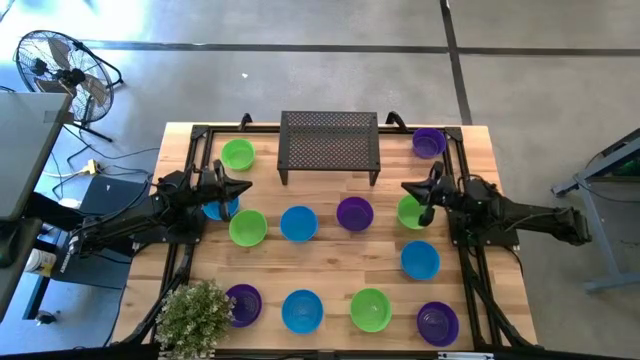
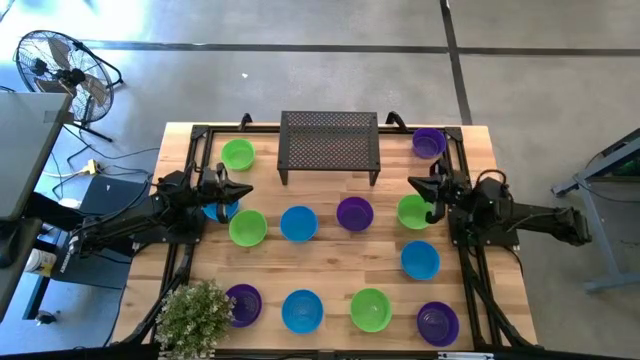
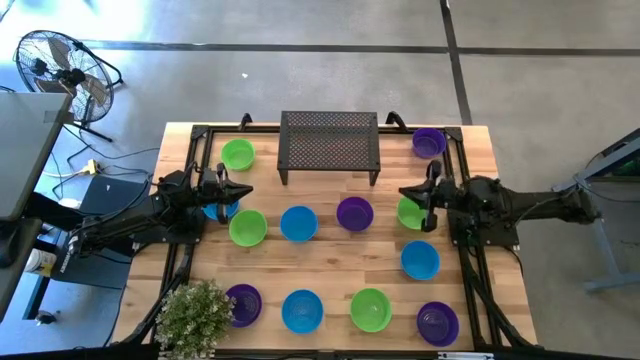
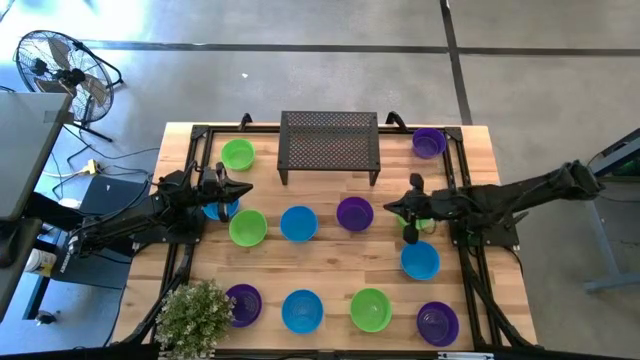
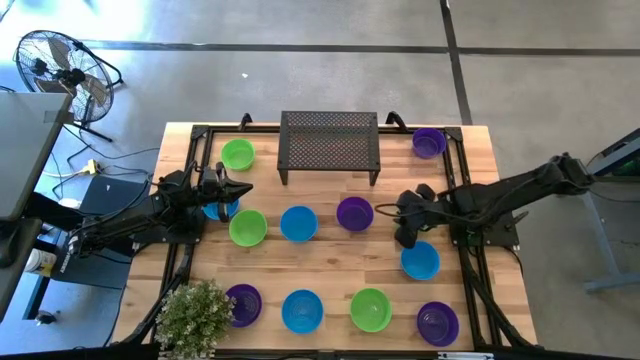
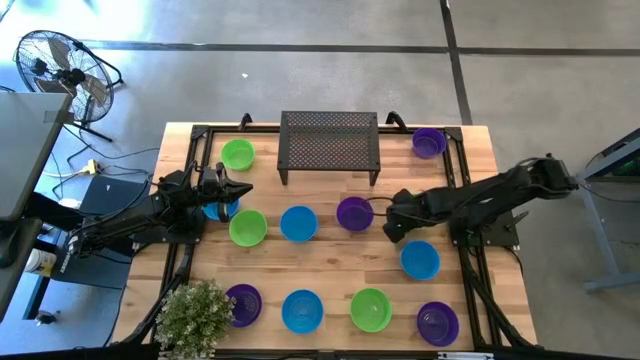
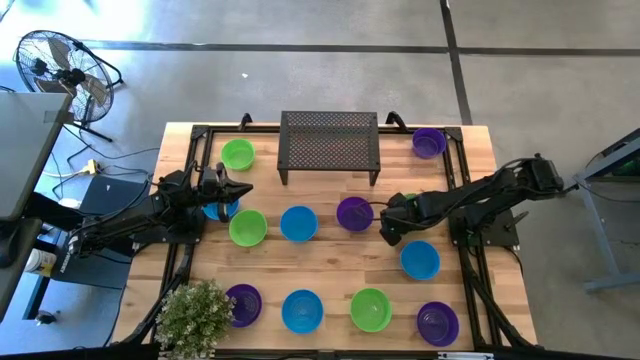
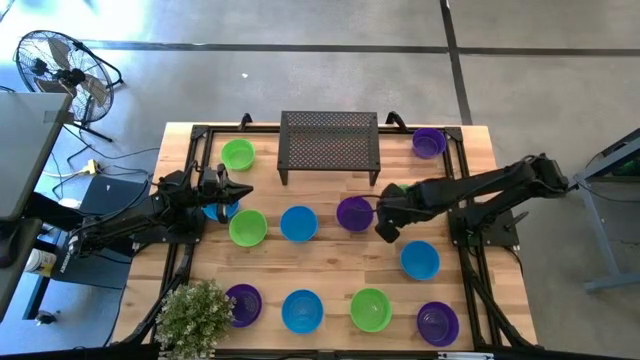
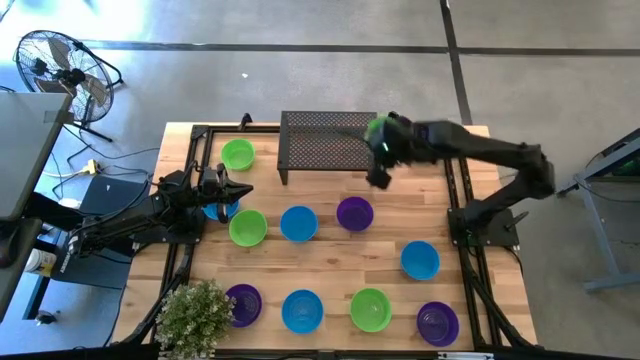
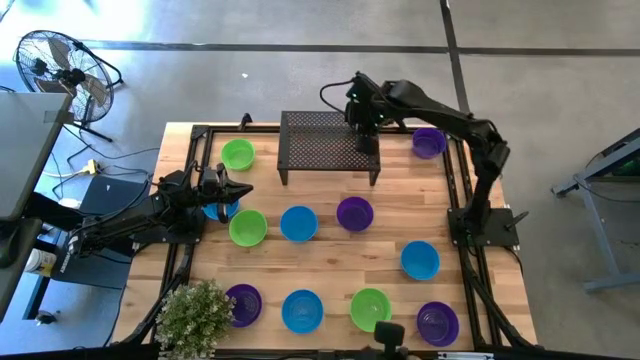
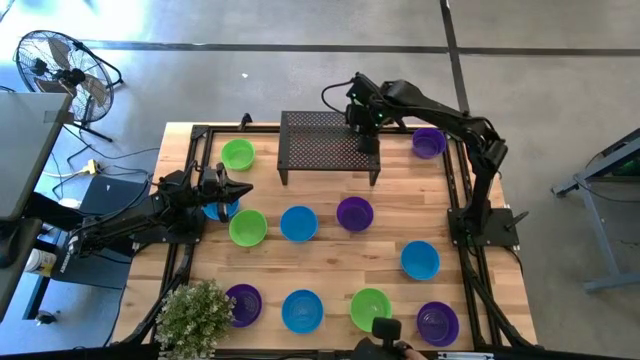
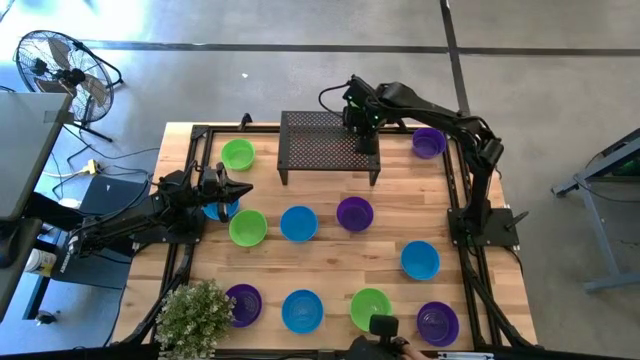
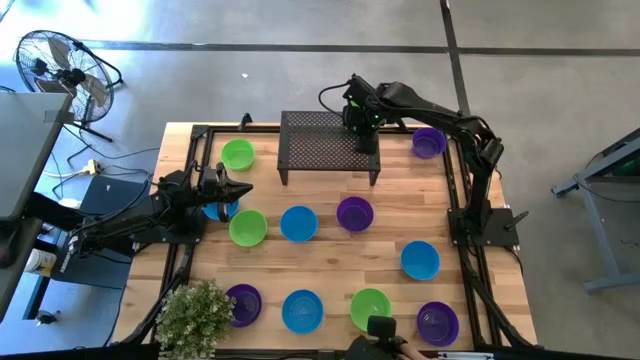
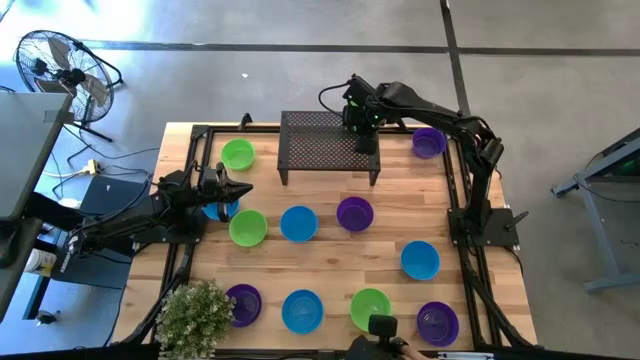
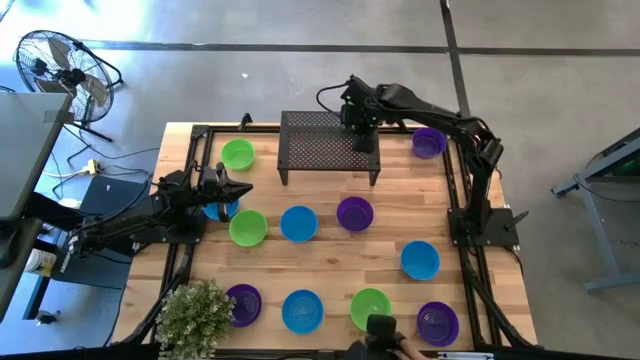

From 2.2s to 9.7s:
Task: Pick & Place Mini bowls
Put the middle right green bowl on the shelf

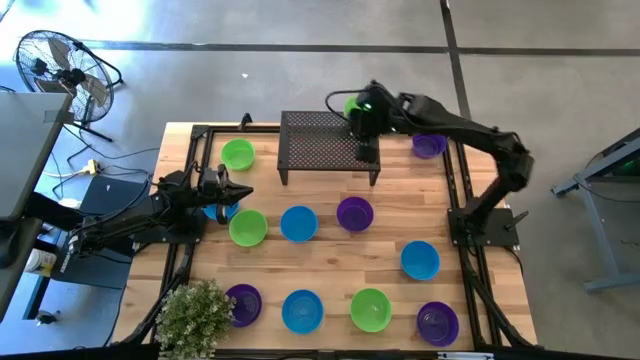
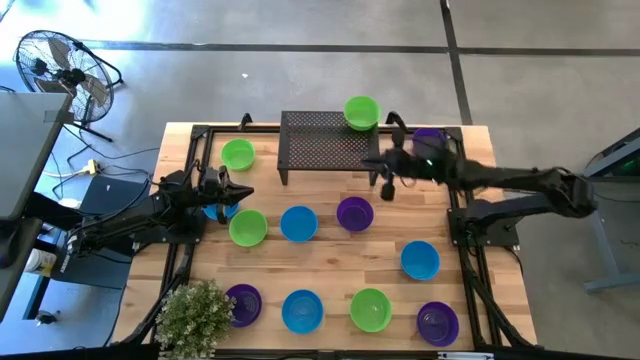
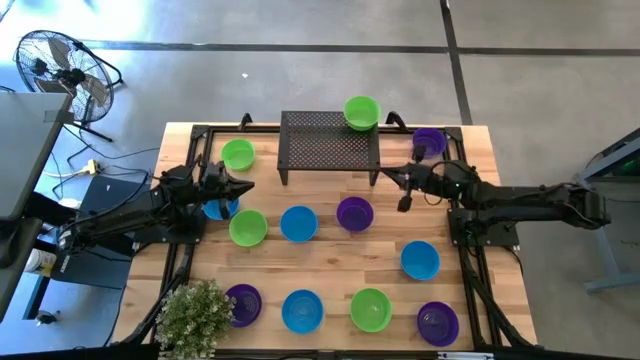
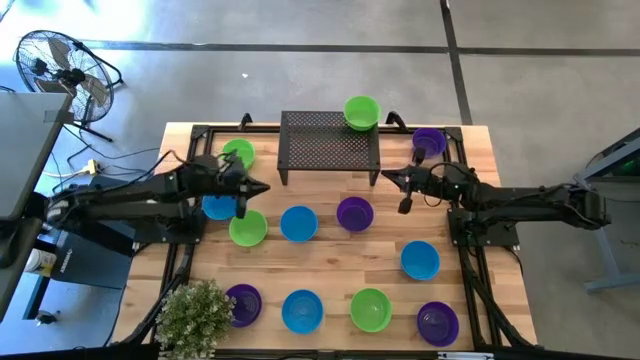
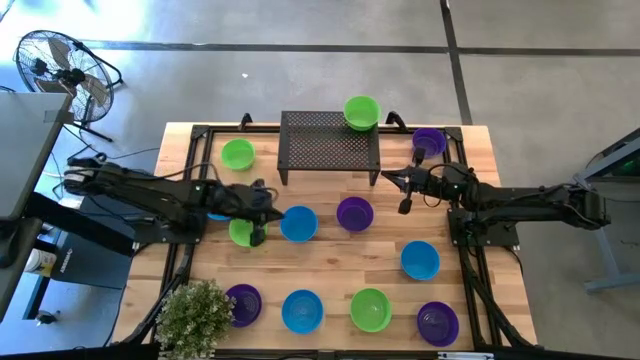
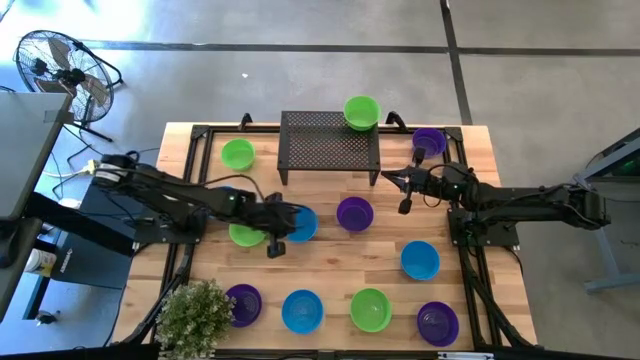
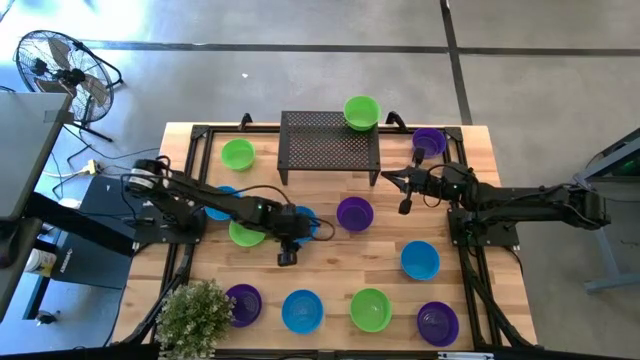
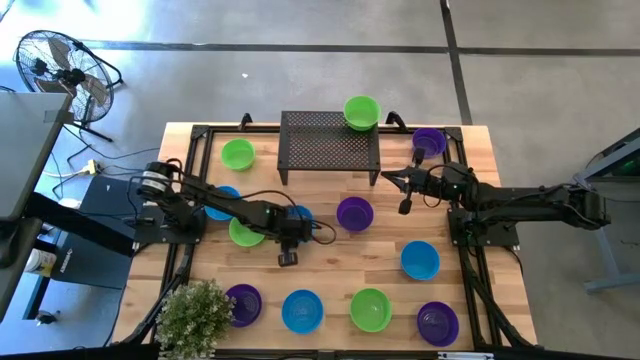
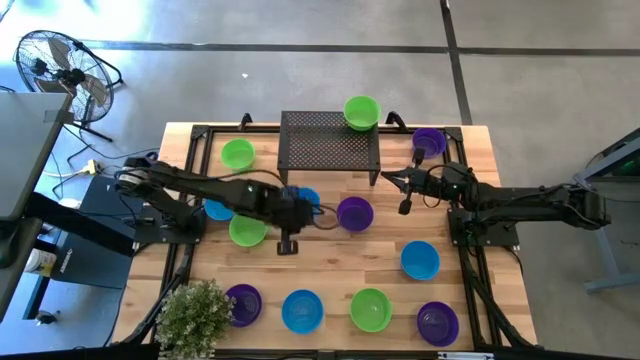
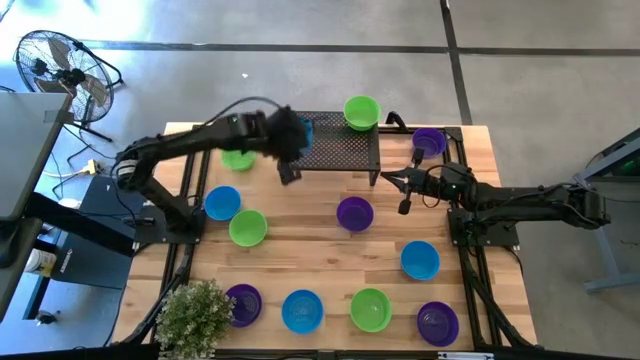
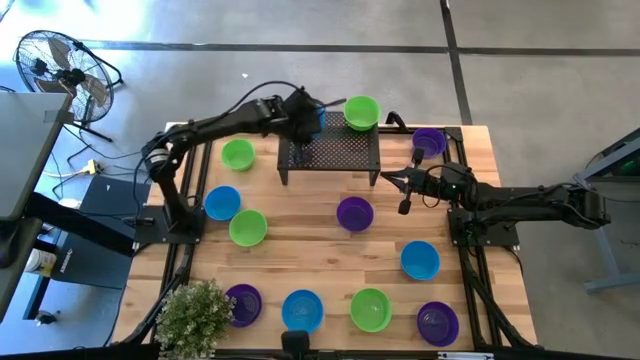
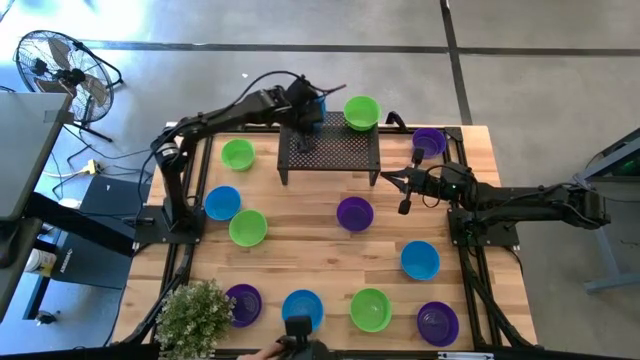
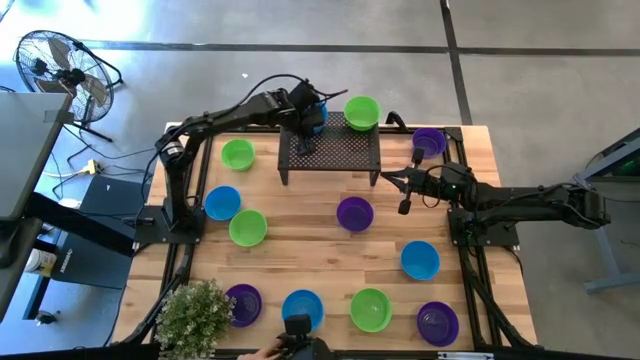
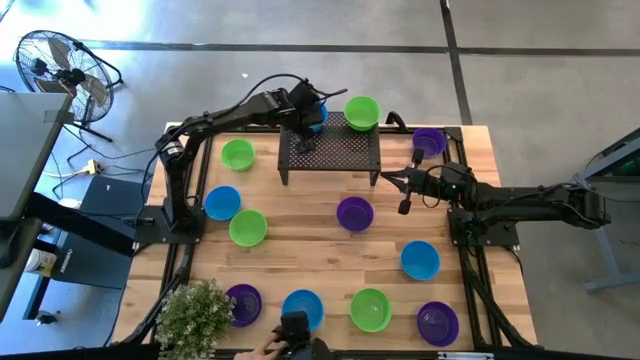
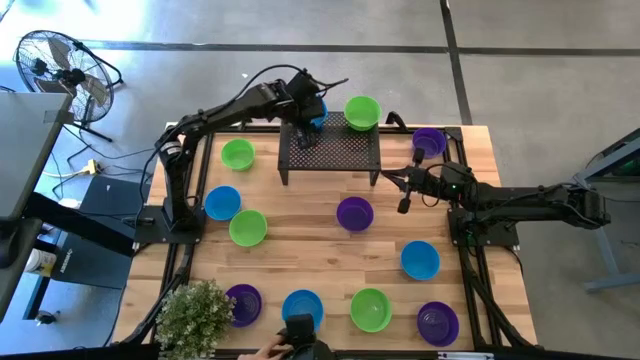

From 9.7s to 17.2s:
Put the top right blue bowl on the shelf

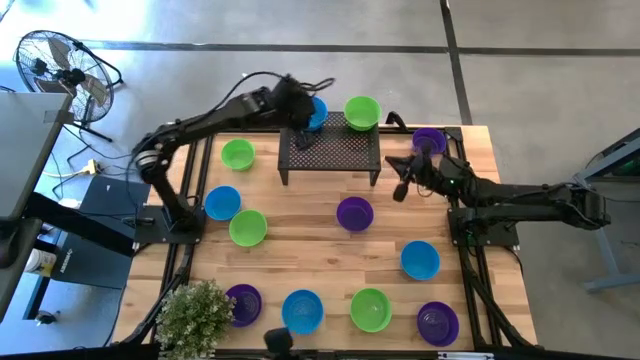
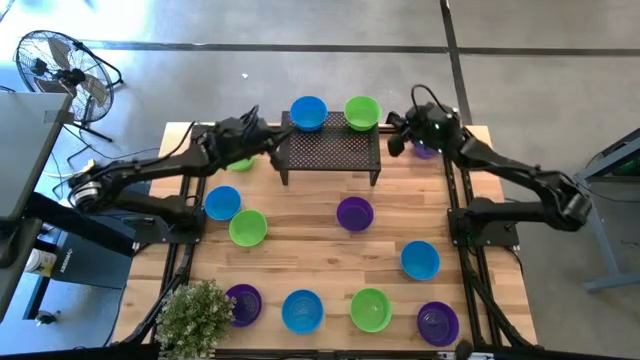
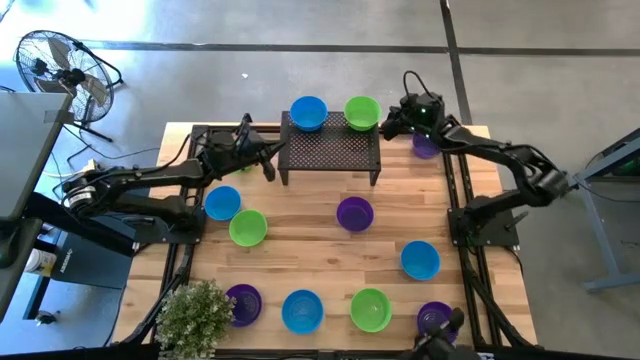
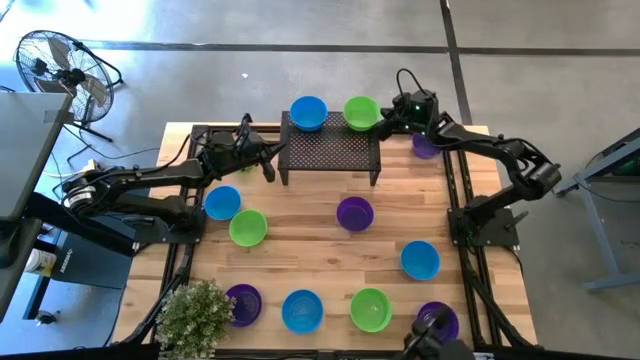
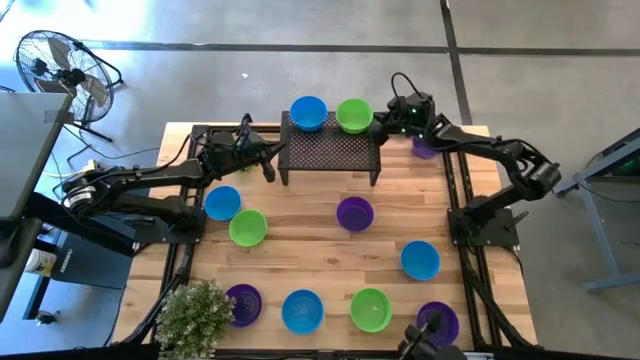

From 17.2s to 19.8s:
Adjust the green bowl on the shelf

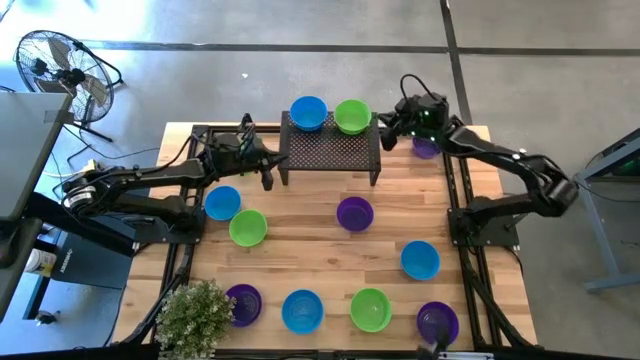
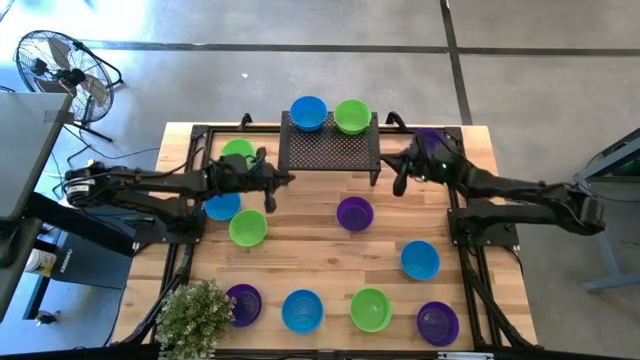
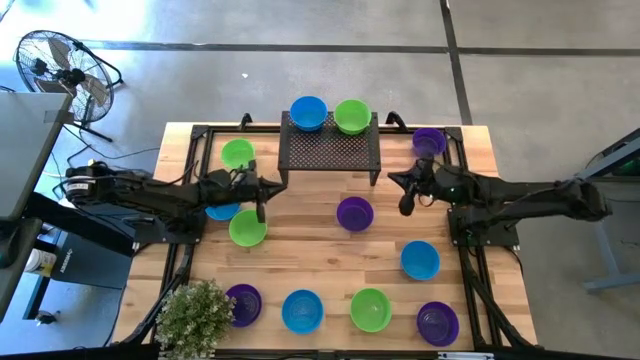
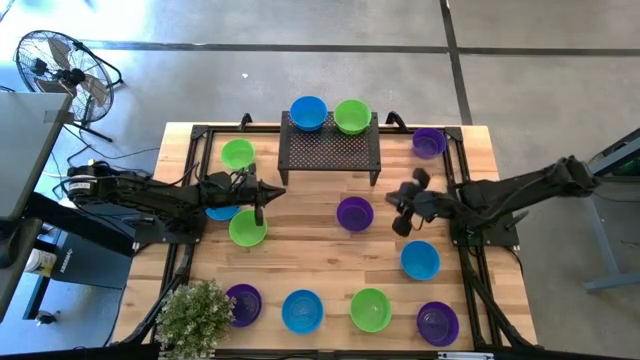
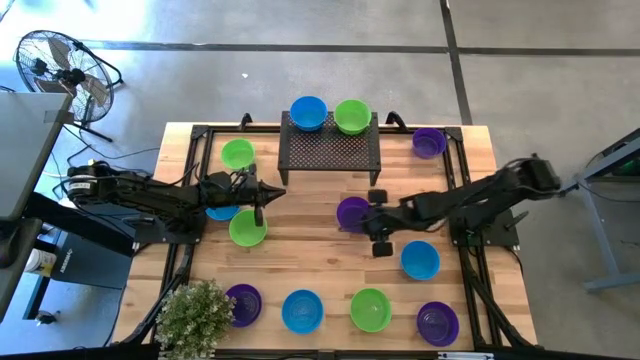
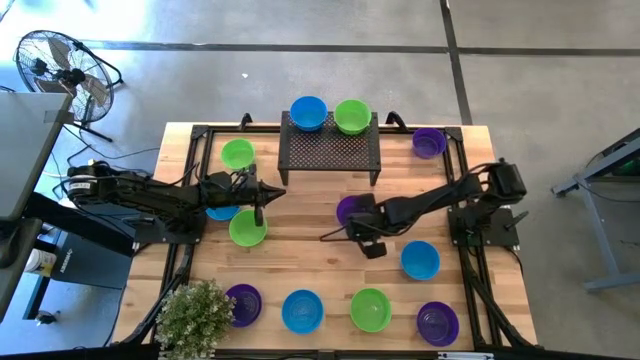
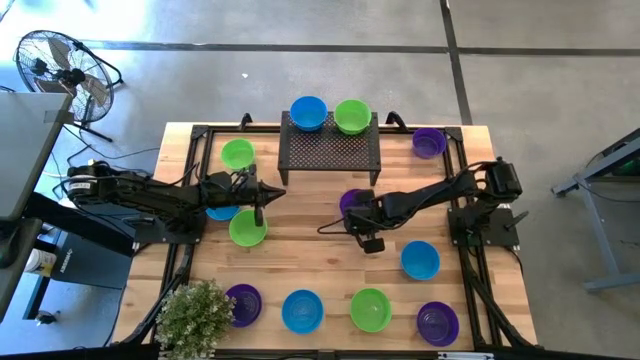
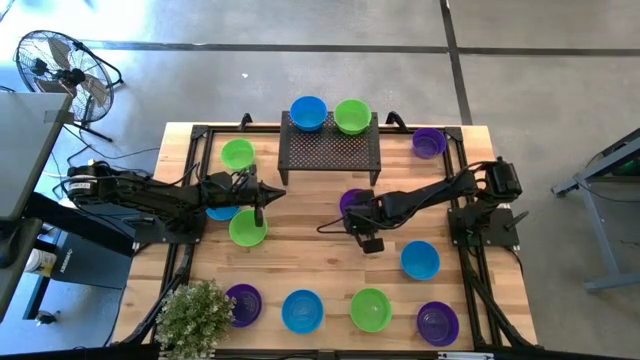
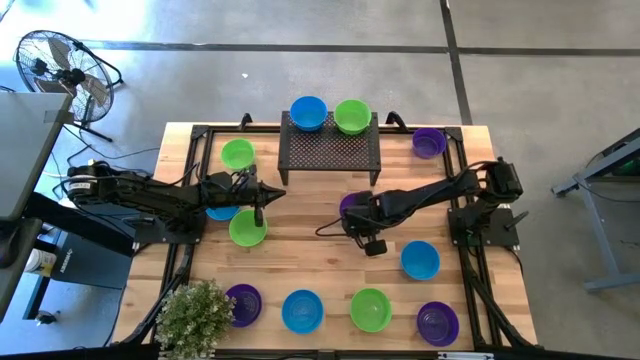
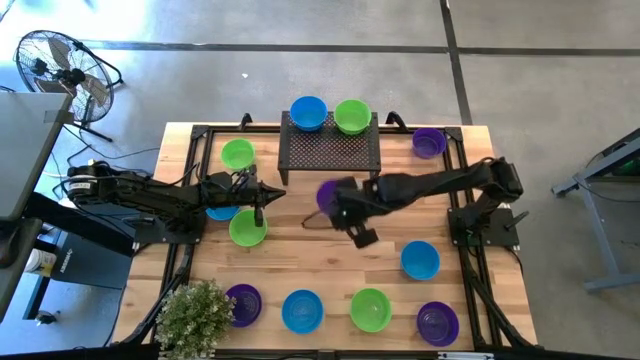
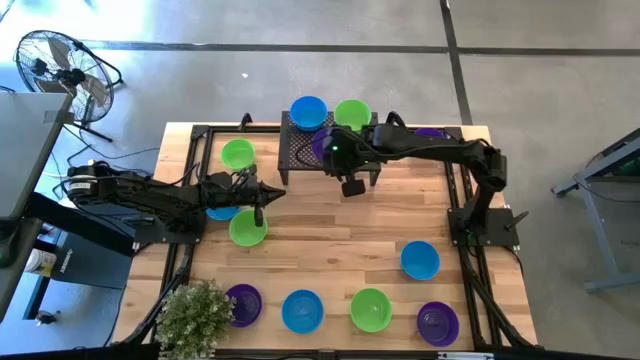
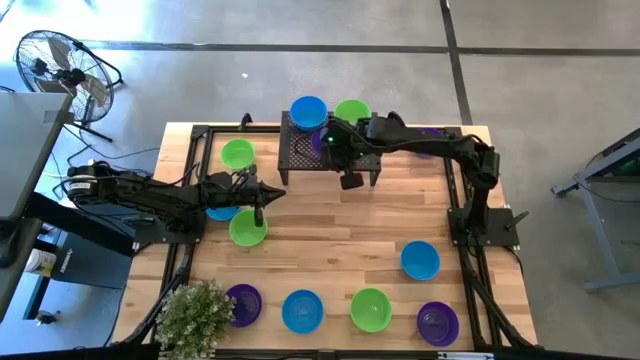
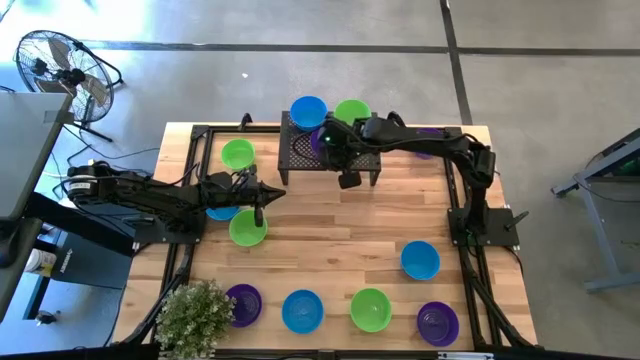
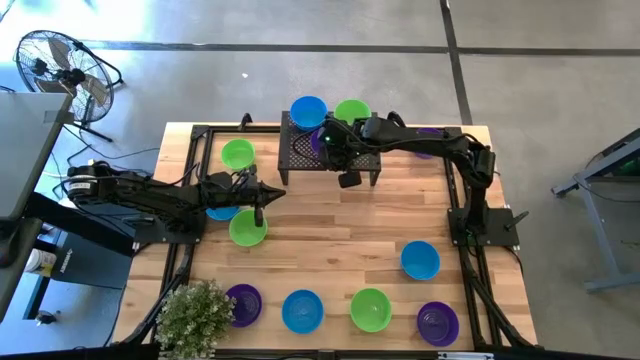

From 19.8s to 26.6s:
Put the middle violet bowl on the shelf
